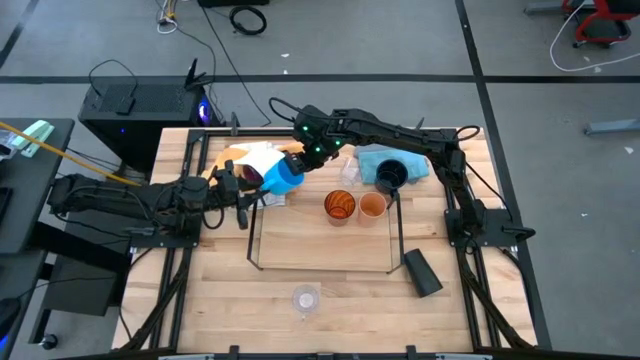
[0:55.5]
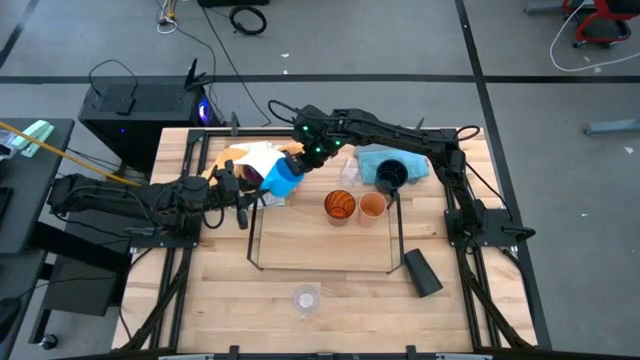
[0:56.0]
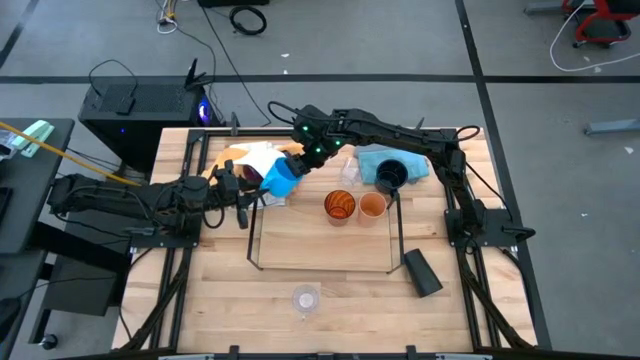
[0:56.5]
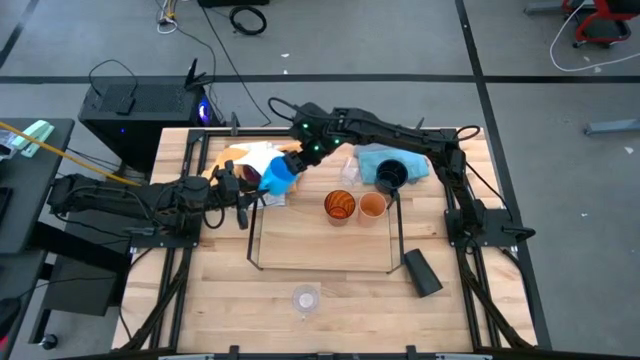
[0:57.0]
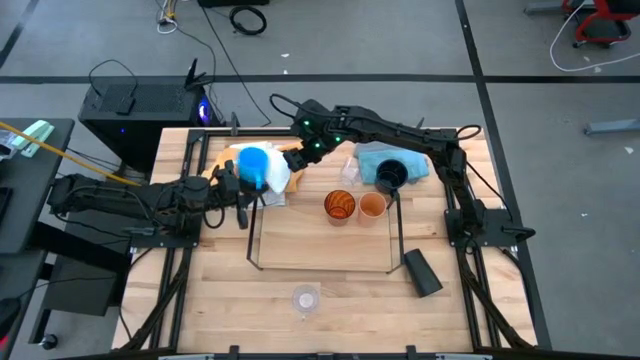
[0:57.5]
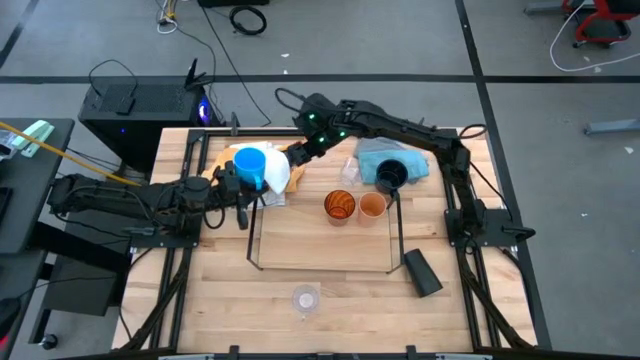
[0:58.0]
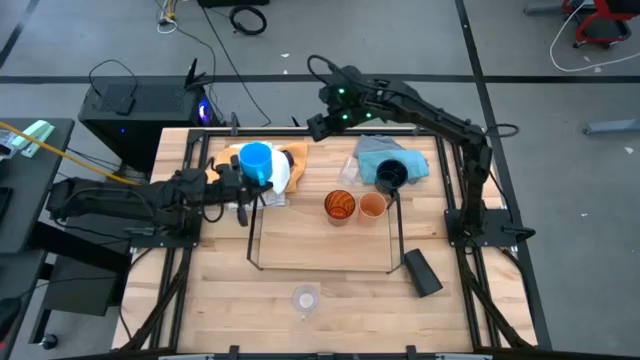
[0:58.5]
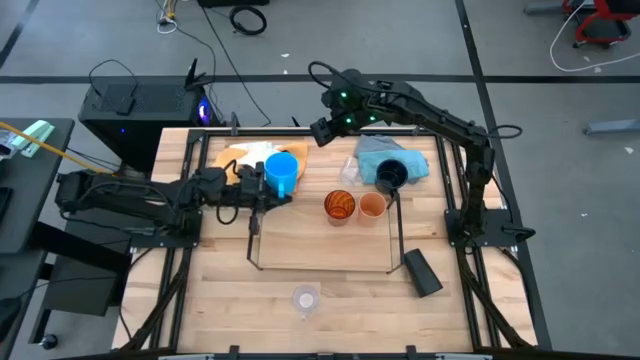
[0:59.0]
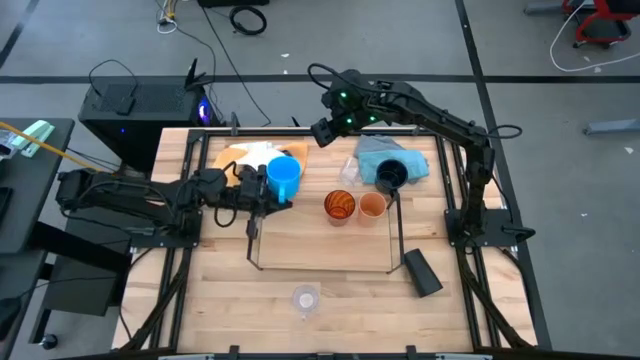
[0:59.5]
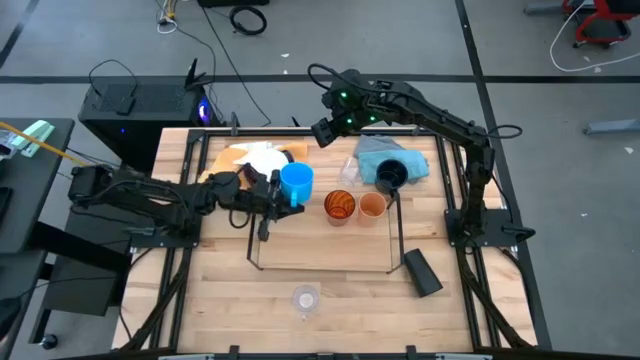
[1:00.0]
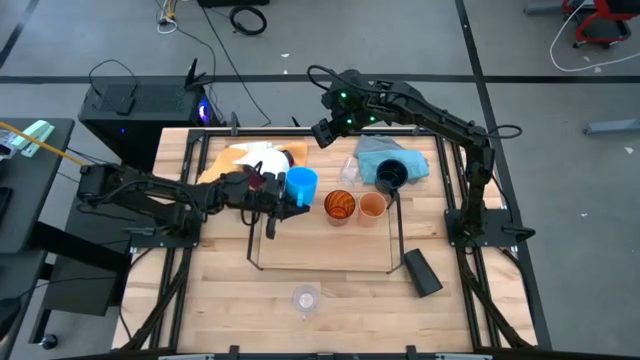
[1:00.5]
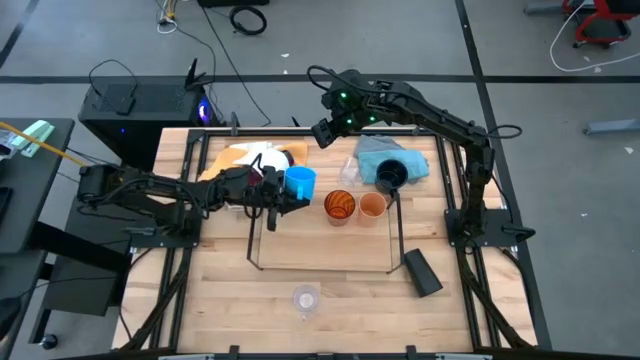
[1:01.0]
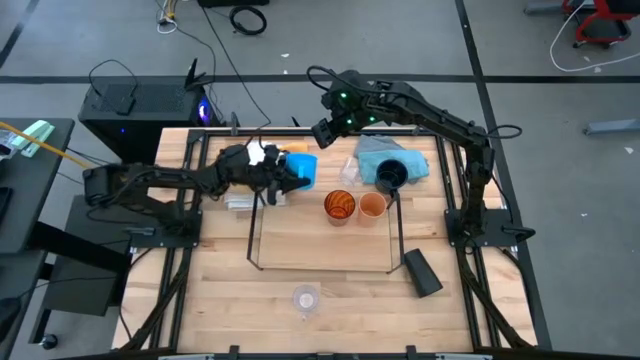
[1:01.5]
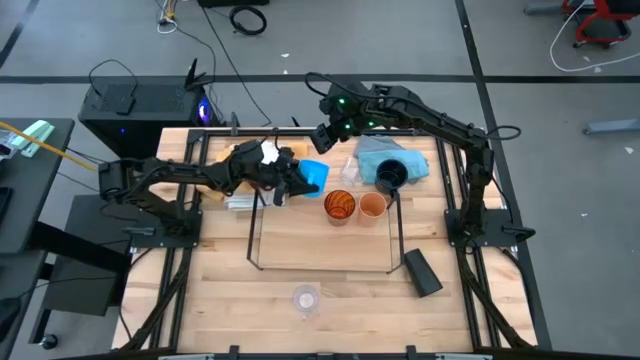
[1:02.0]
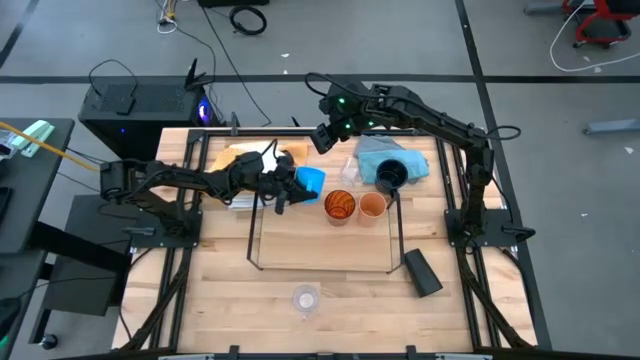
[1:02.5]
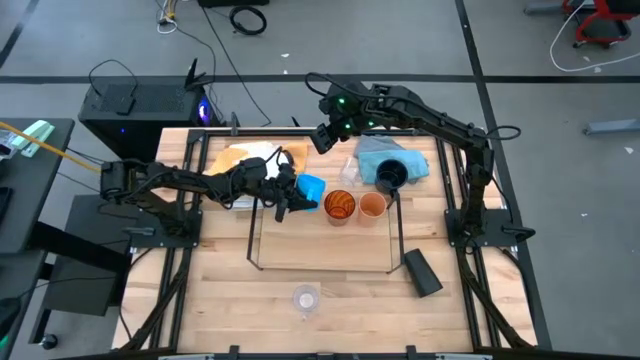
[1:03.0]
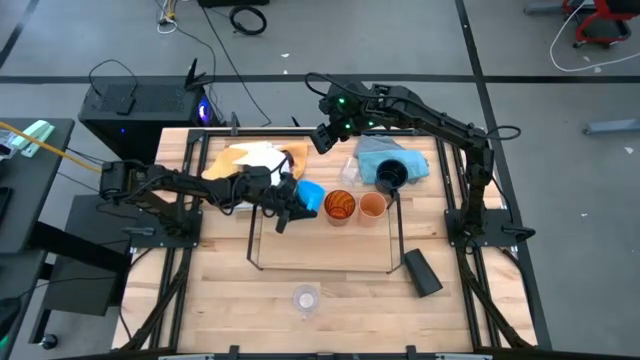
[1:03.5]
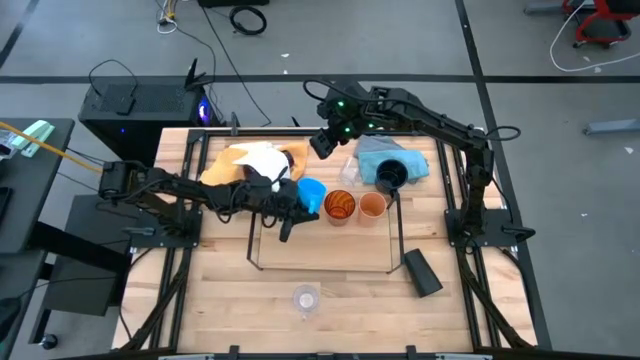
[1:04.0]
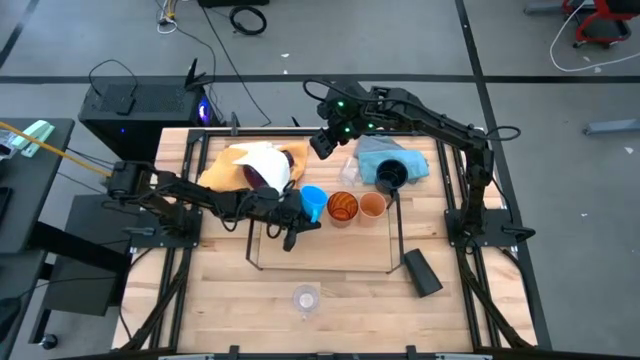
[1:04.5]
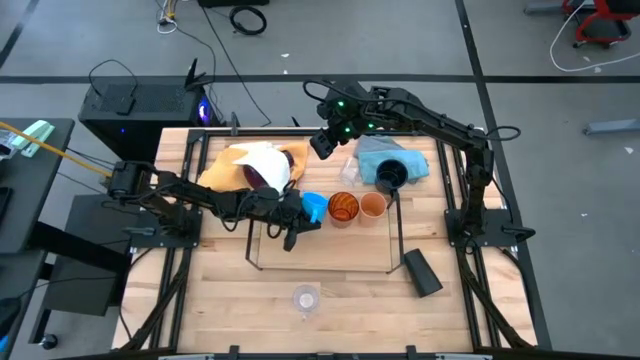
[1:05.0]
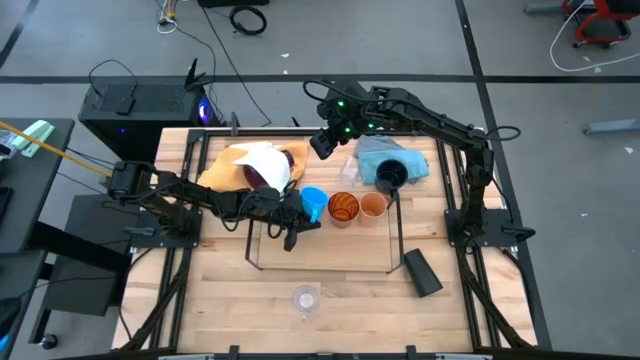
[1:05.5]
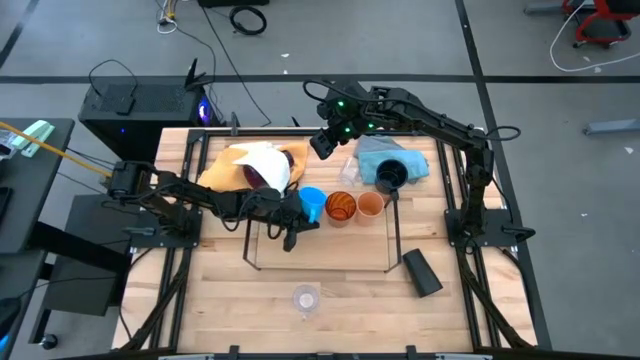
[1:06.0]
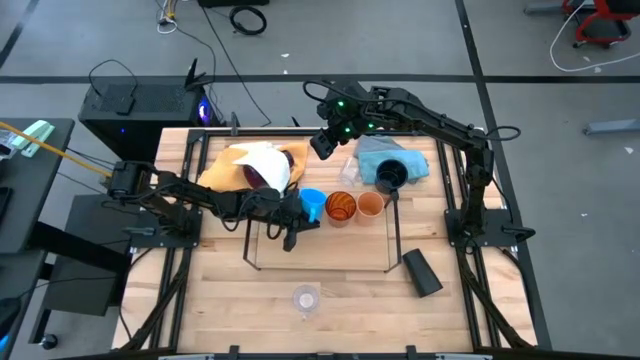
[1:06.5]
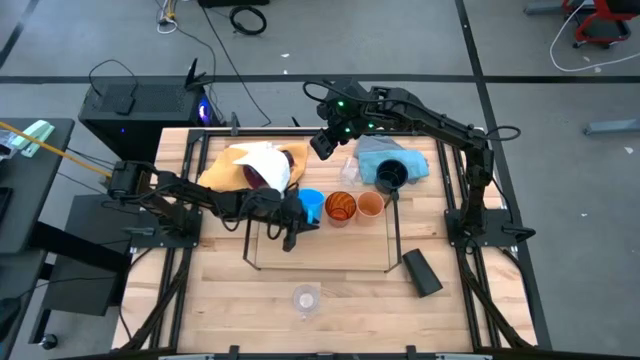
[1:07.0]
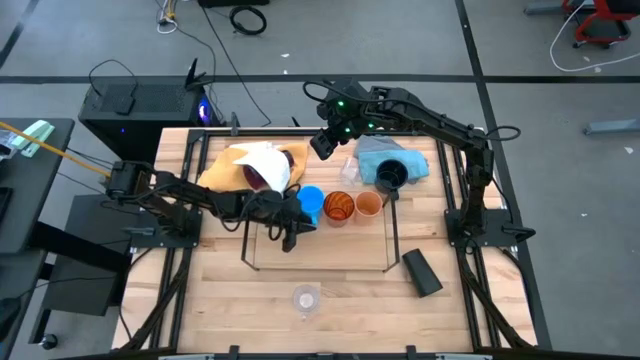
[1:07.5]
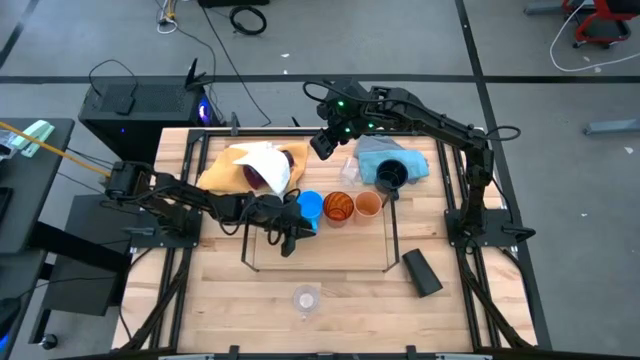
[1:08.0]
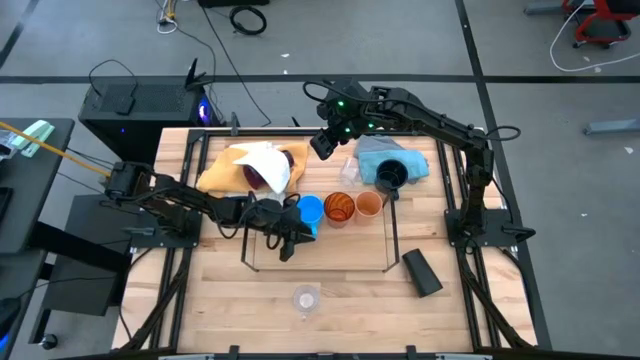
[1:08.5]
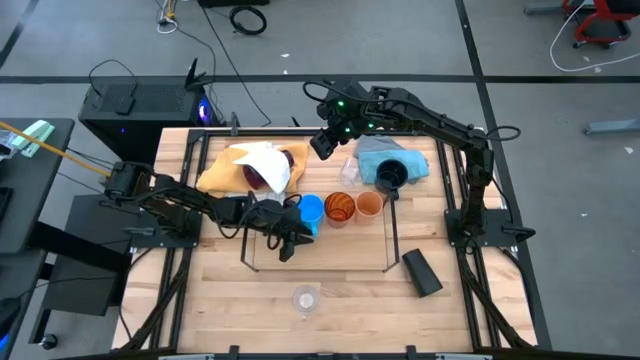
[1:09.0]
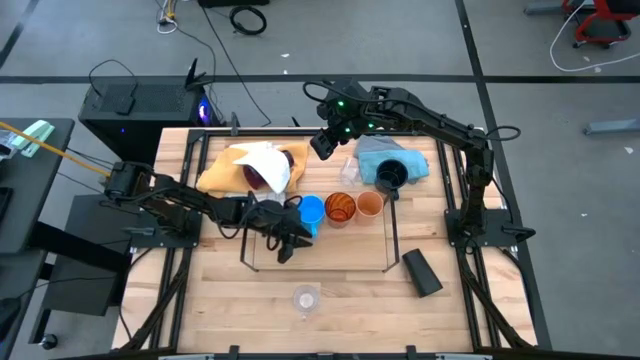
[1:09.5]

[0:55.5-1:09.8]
Task: Stack small to large cups/mugs on shelf
Put the blue mug on the shelf

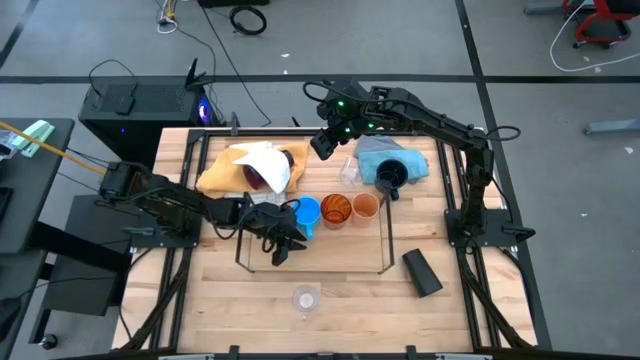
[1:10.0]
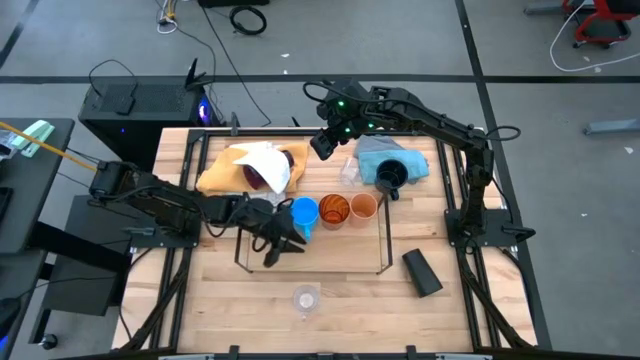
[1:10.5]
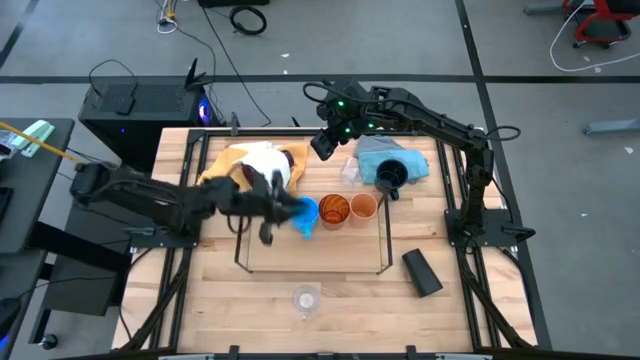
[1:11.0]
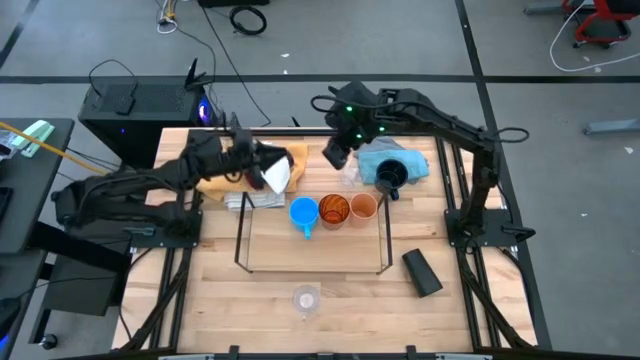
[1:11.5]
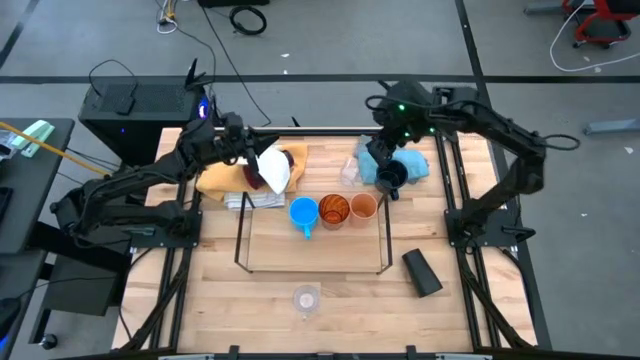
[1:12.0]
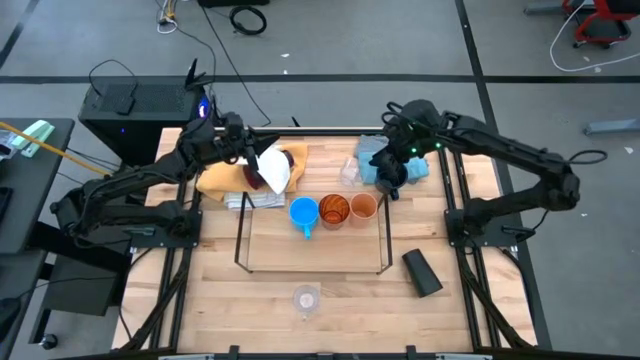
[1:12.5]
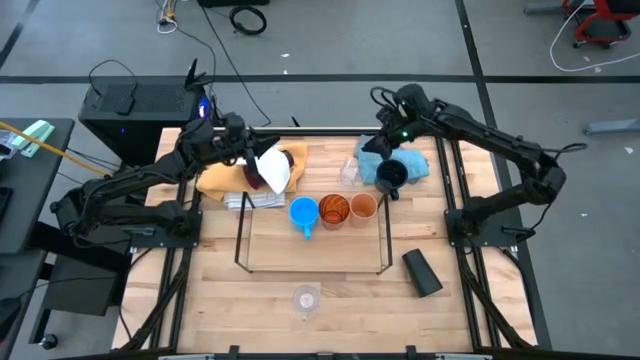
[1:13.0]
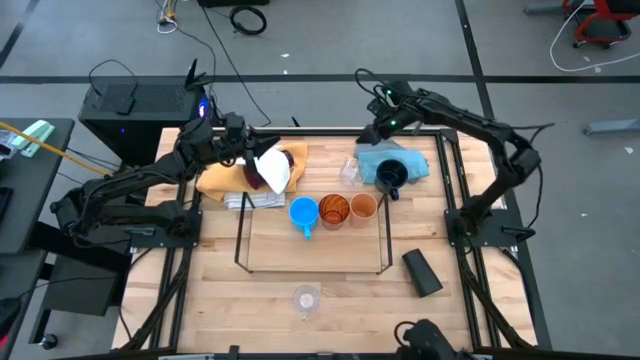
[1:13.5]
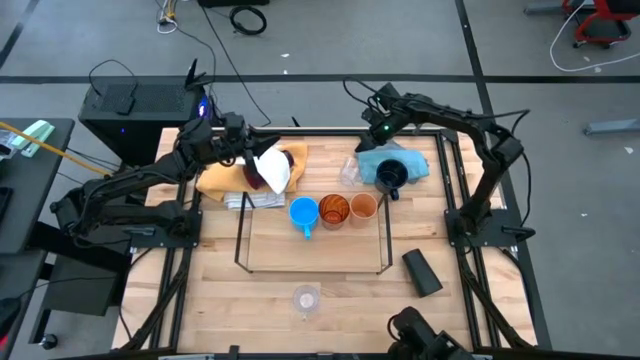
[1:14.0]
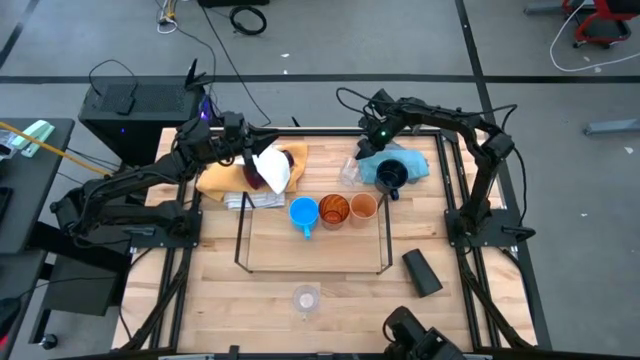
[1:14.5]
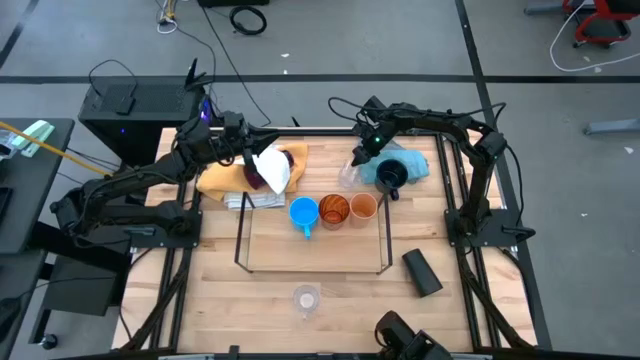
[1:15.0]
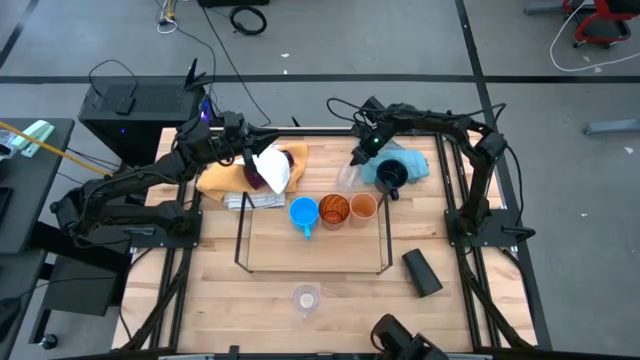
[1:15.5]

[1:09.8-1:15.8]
Put the transparent mug on the shelf

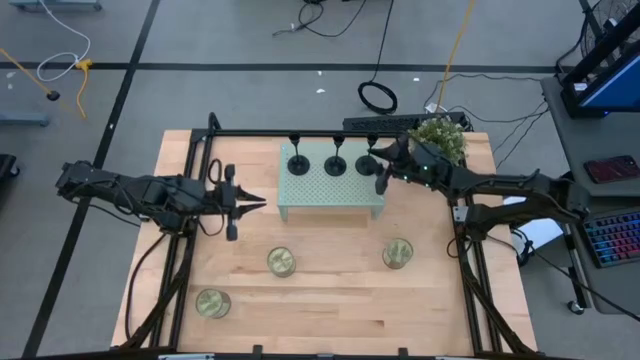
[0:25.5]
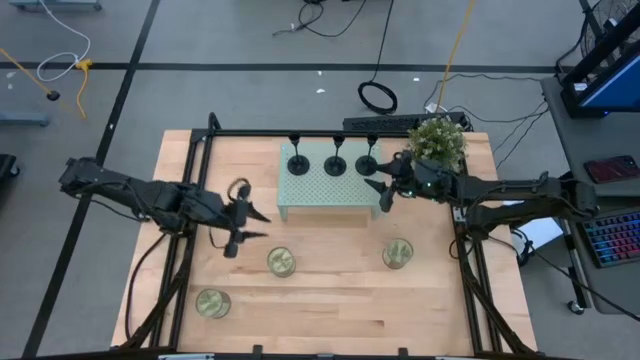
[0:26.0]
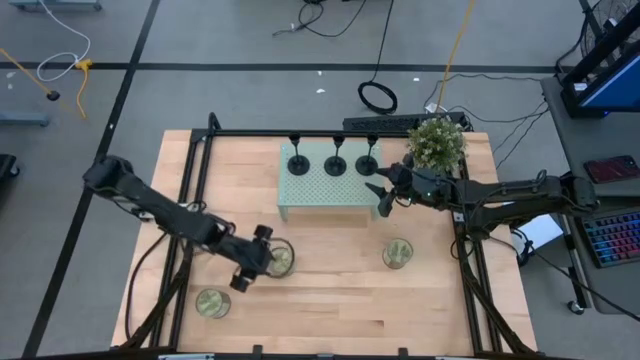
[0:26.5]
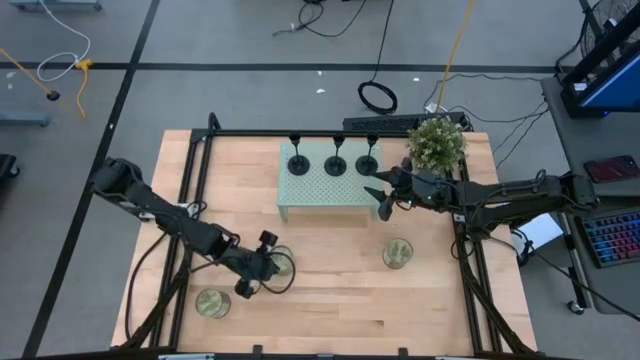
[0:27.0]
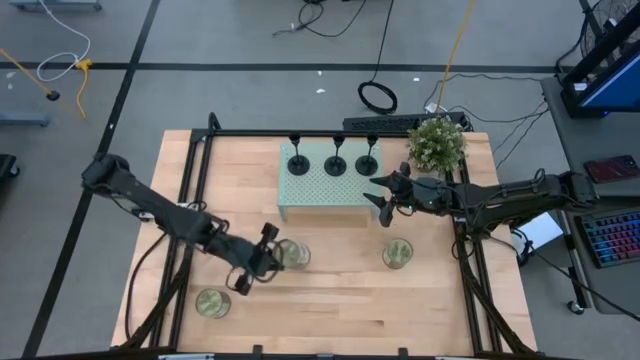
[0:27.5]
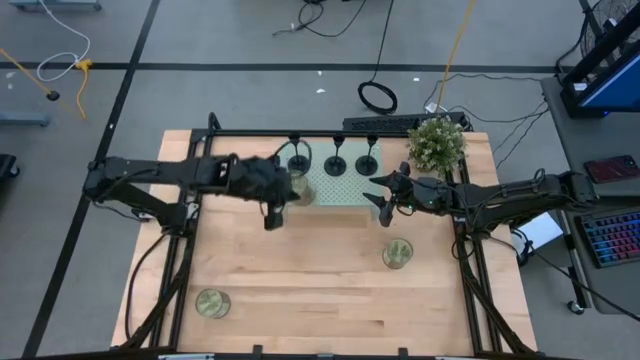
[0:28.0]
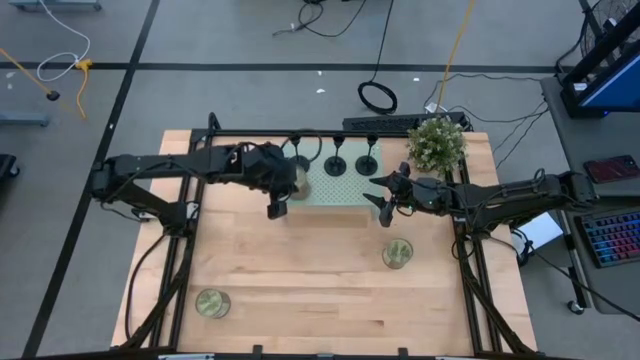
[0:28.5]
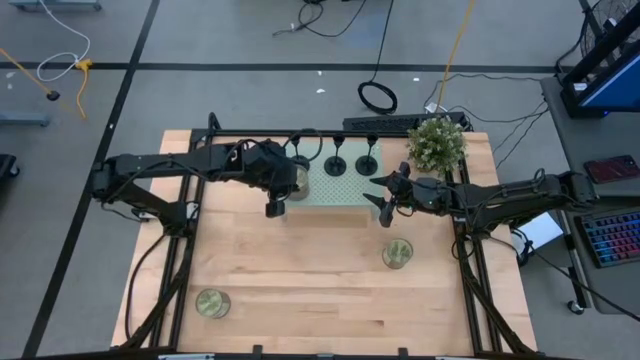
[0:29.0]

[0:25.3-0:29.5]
Task: Stock candles and holders on shelf
Put the middle scented candle on the shelf
